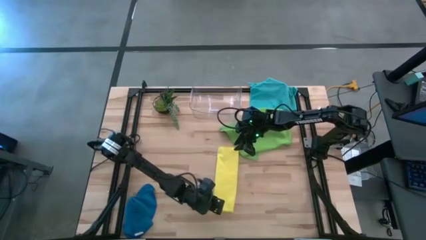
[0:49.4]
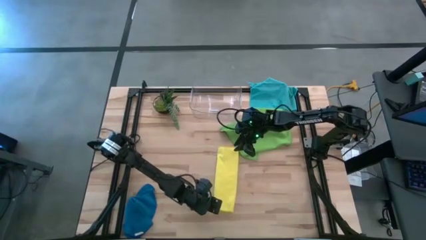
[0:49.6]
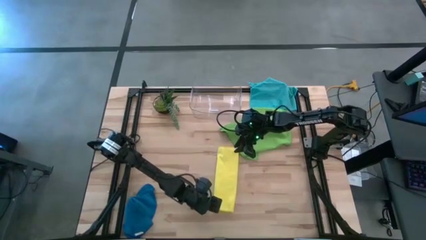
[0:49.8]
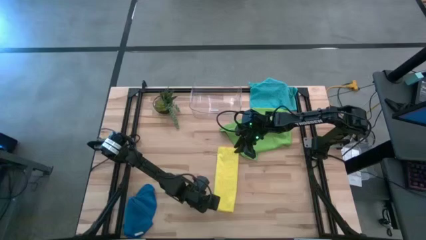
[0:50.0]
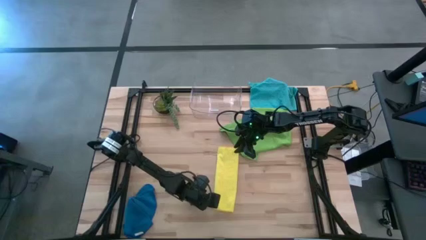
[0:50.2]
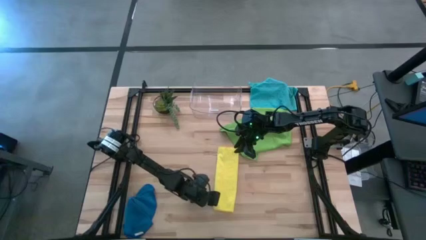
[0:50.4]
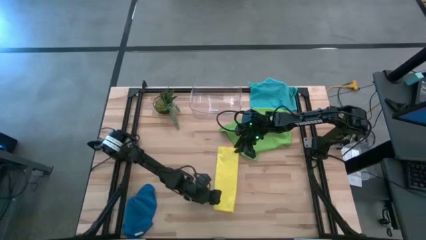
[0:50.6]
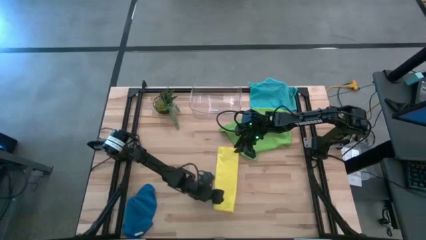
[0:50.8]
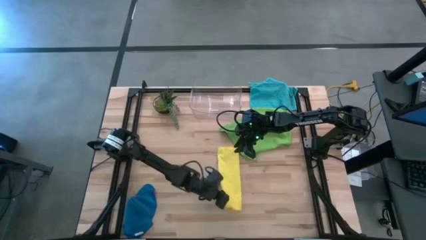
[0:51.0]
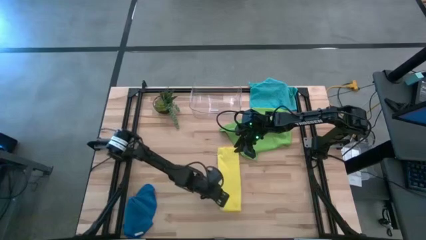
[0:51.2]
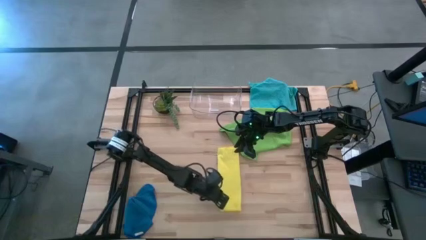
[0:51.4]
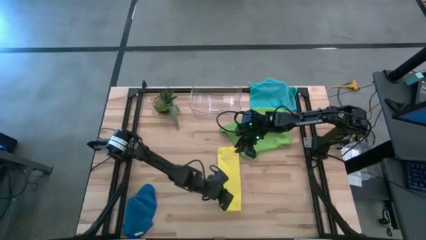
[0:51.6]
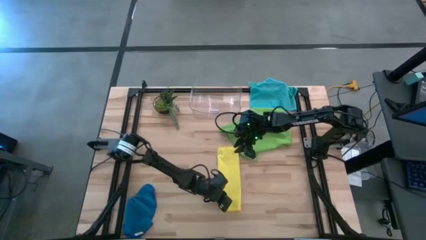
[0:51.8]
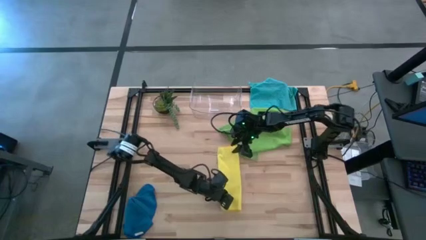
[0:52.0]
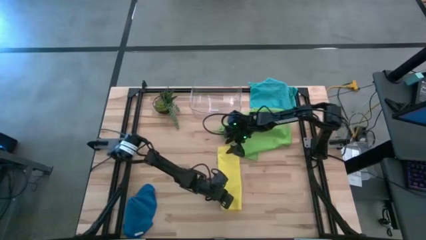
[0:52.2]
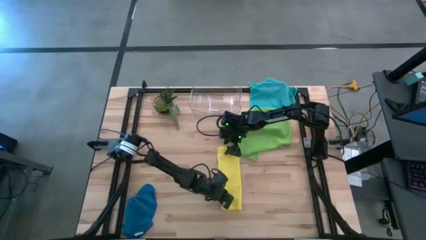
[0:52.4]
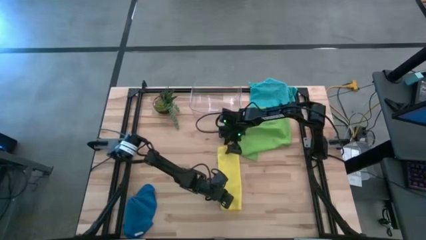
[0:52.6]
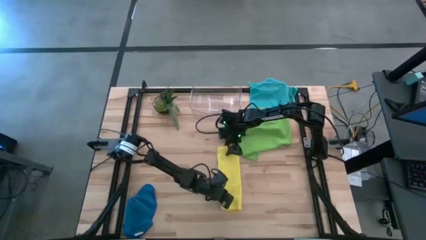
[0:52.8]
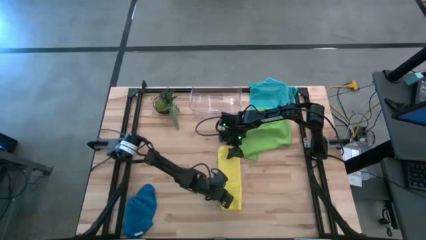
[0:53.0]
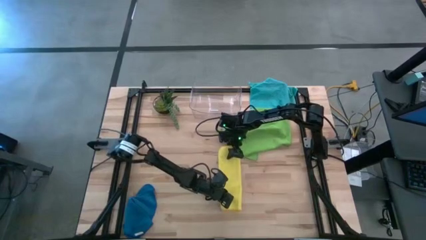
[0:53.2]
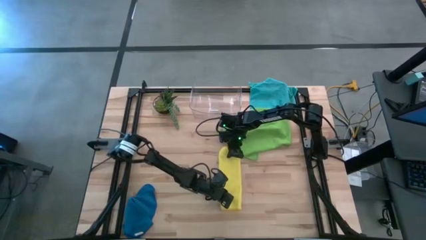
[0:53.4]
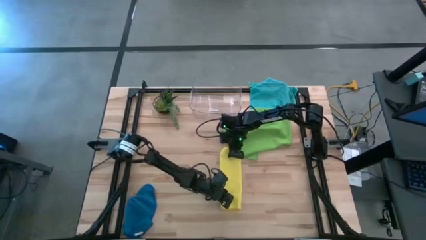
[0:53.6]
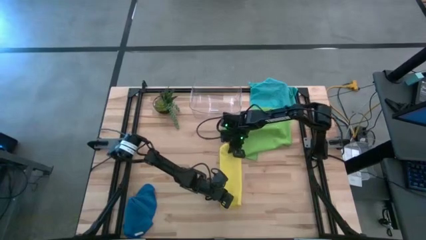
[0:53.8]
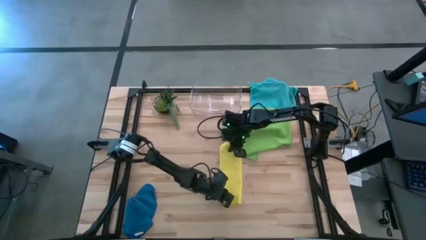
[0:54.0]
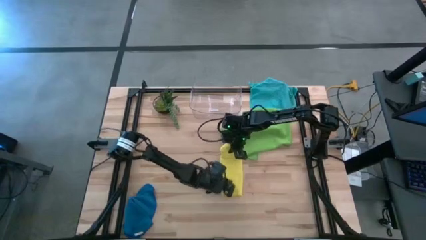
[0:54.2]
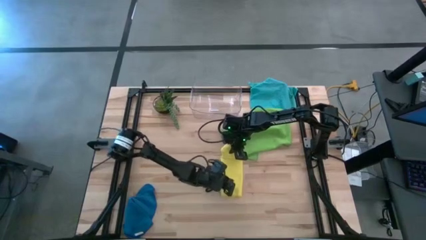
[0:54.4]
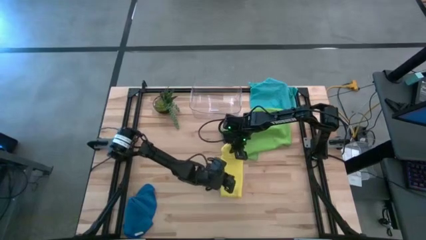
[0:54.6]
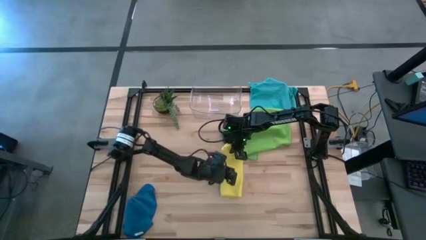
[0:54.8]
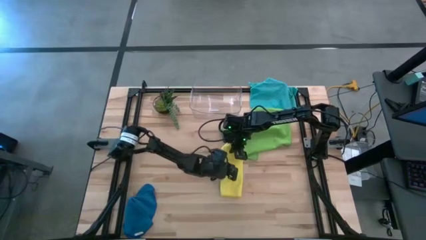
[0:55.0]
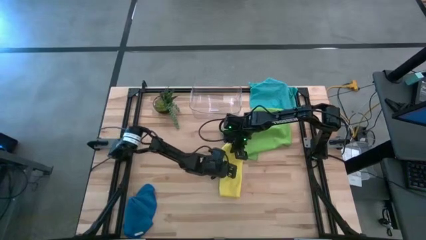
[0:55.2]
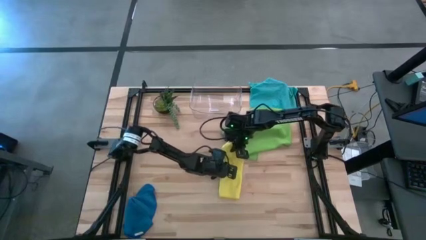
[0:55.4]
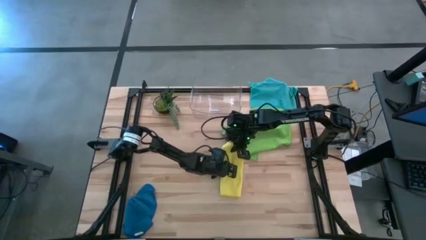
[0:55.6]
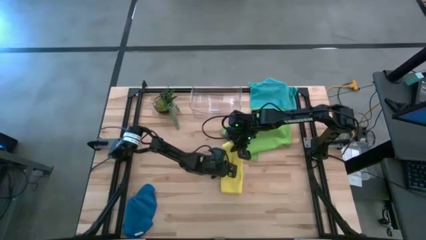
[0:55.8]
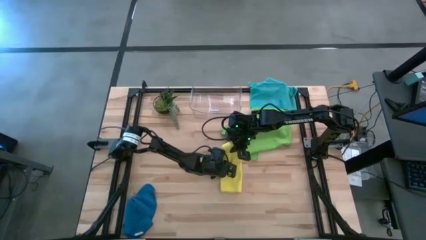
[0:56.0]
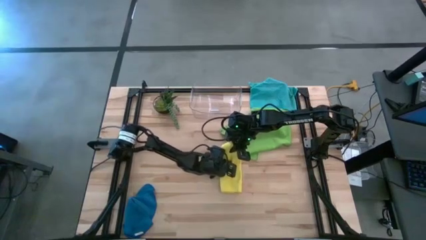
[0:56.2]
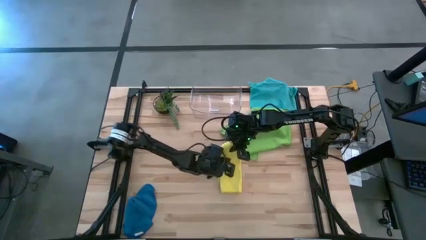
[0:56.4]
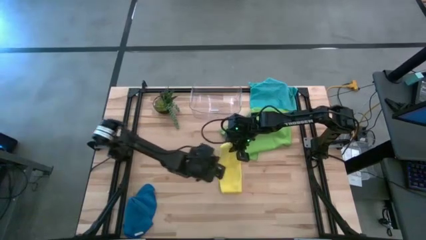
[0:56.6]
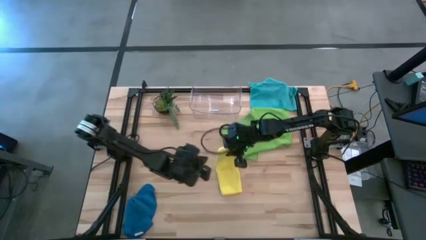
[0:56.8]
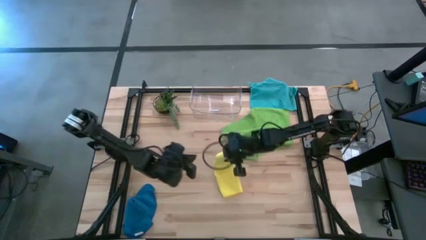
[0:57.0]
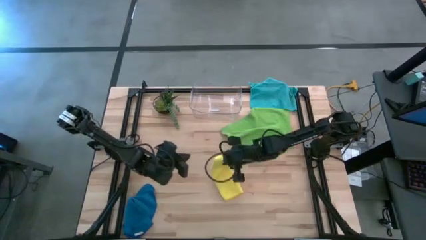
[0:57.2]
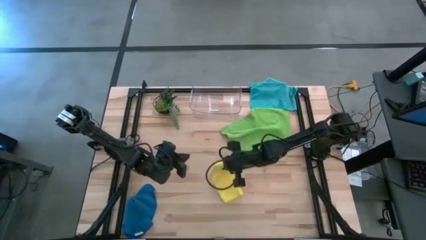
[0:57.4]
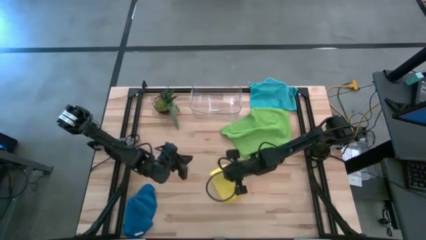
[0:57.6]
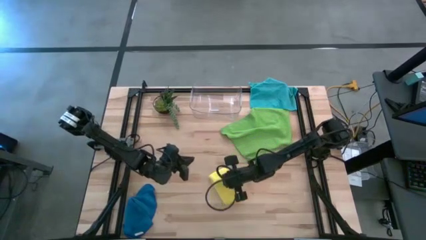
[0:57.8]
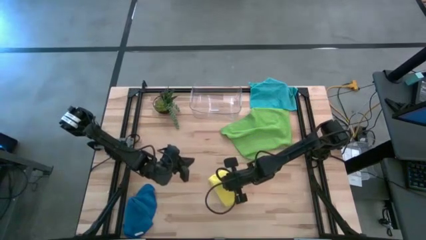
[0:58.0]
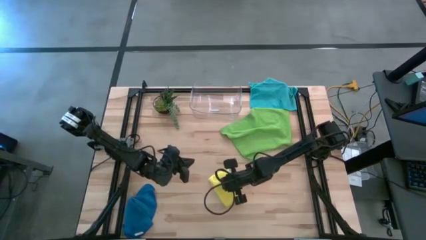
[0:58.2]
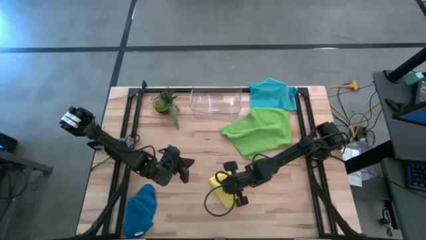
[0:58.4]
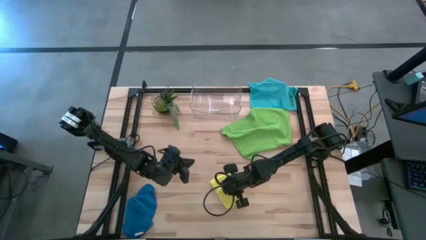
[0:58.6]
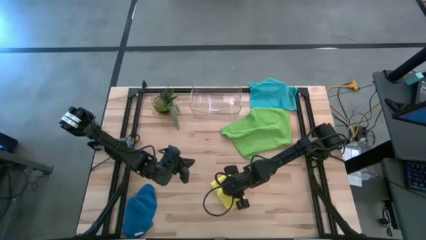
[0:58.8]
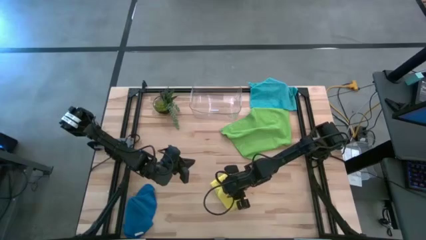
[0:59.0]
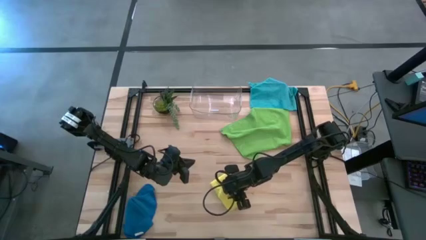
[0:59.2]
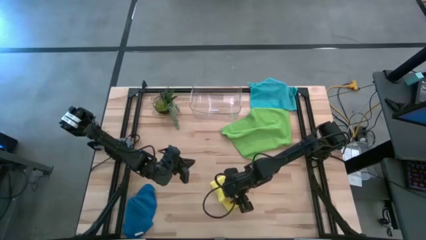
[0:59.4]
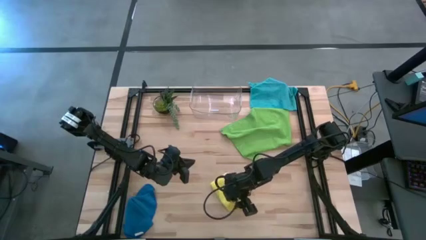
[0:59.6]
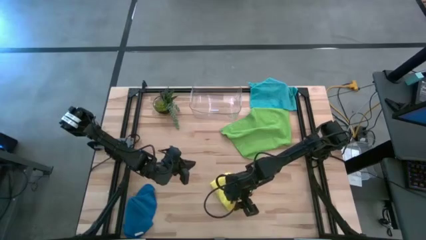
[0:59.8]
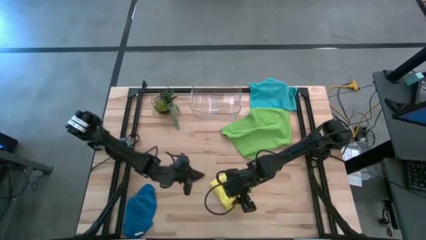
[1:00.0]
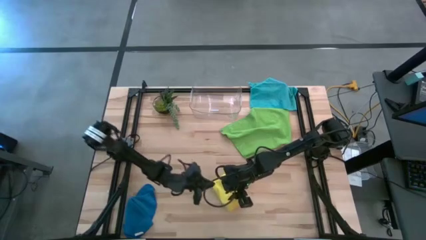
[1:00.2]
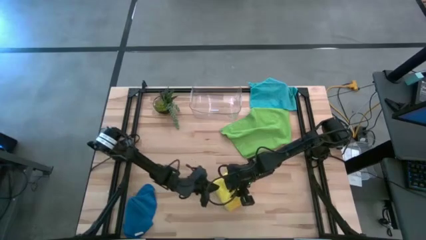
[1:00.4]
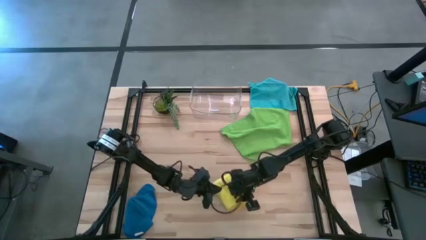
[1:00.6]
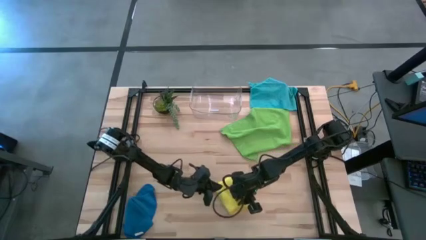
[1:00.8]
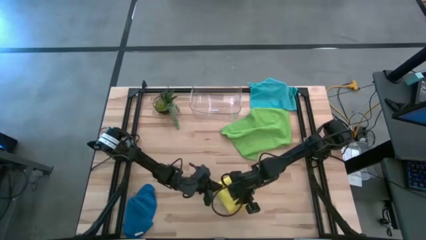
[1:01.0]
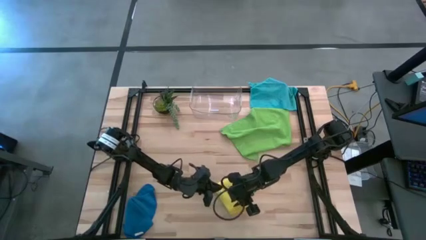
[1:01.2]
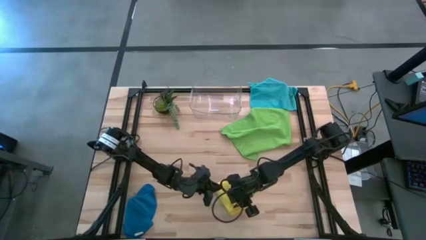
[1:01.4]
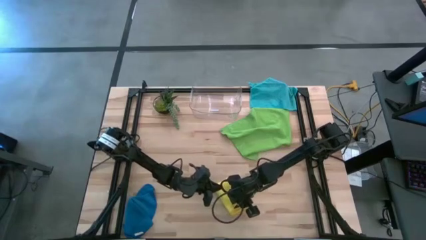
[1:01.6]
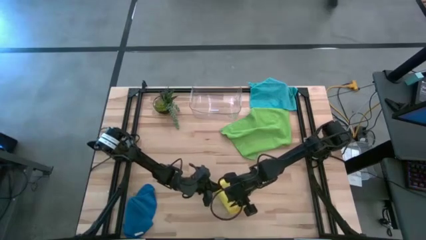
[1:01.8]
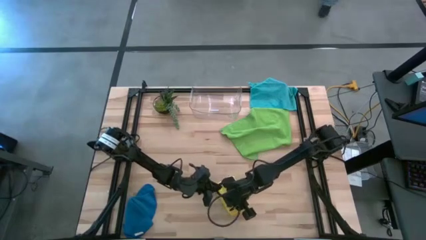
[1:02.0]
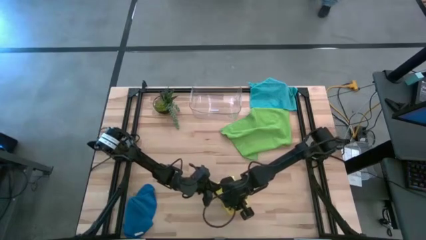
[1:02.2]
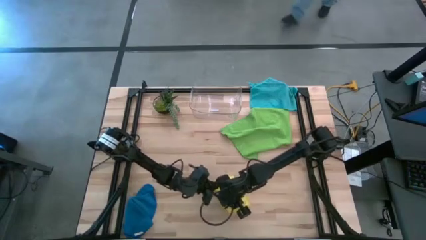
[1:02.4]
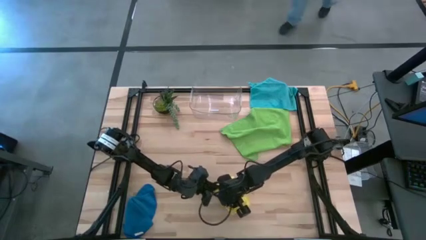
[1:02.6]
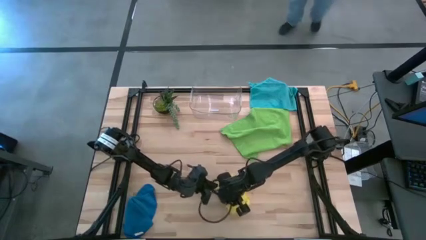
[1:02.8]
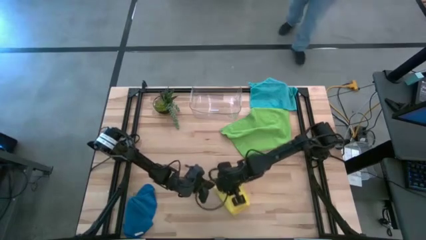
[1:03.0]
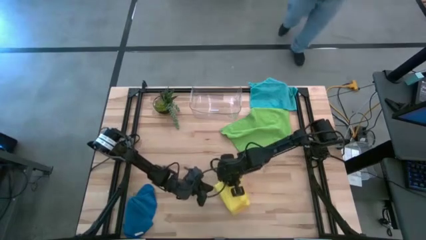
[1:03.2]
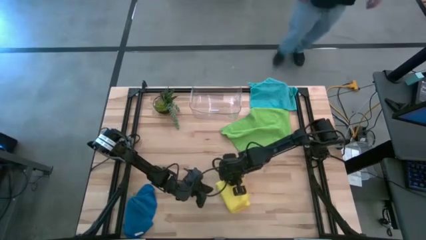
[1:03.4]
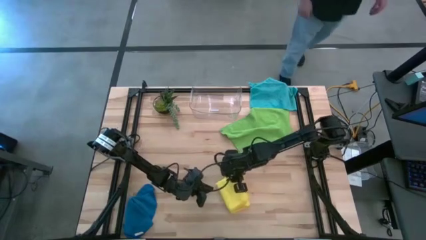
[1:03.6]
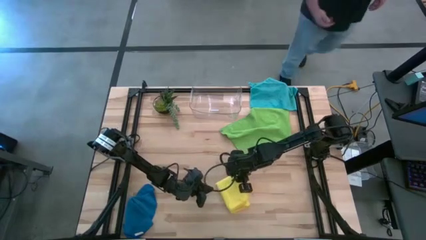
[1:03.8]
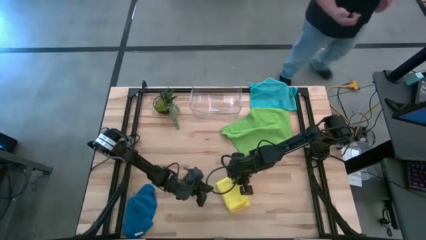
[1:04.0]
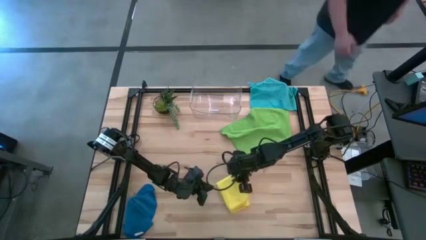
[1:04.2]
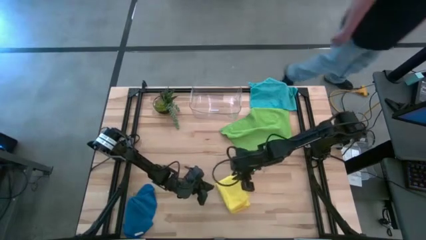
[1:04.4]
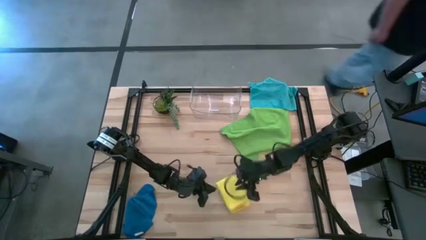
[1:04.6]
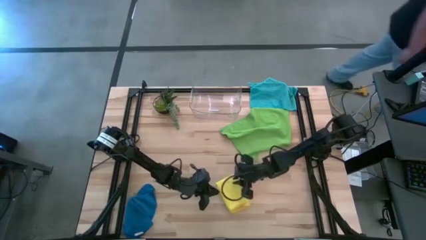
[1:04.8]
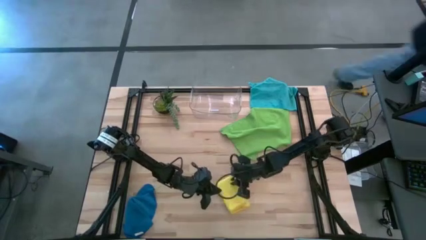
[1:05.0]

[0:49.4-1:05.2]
Task: Fold microfiber towels
Fold the yellow towel
